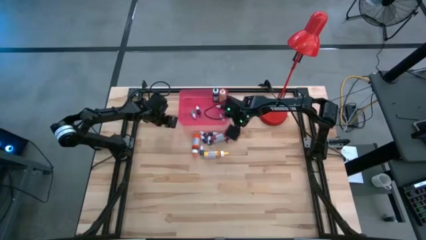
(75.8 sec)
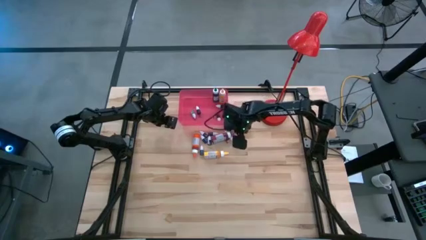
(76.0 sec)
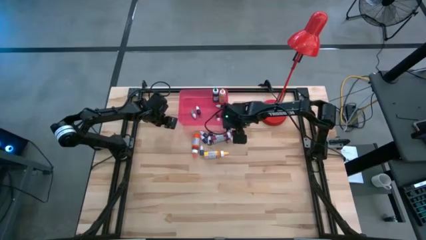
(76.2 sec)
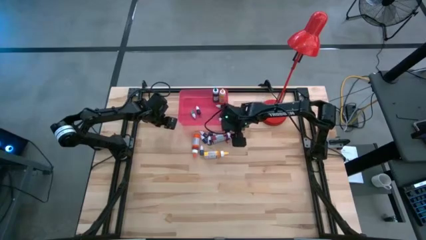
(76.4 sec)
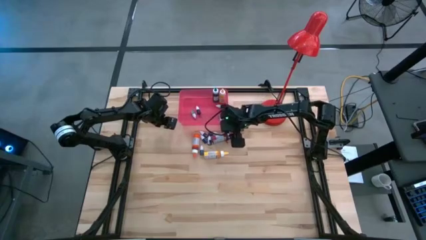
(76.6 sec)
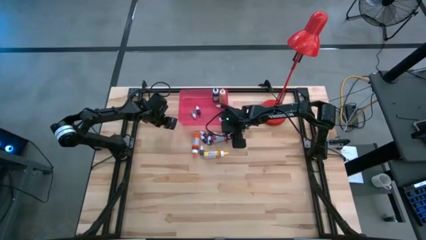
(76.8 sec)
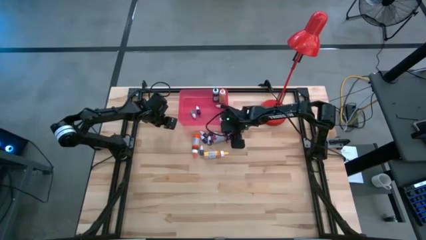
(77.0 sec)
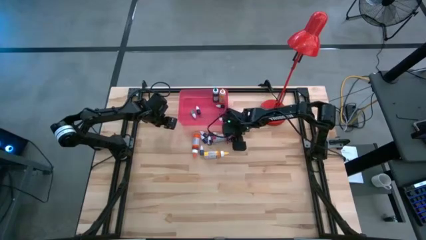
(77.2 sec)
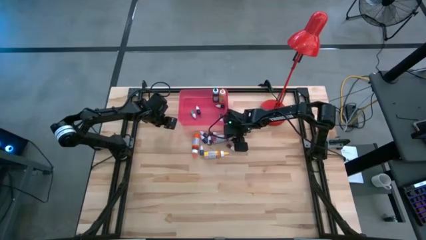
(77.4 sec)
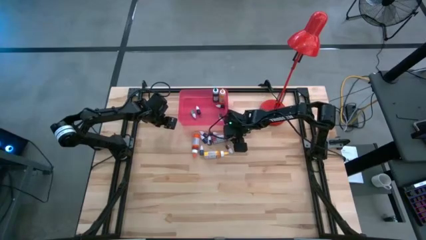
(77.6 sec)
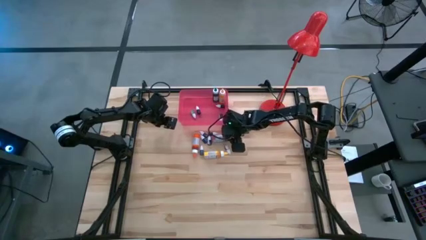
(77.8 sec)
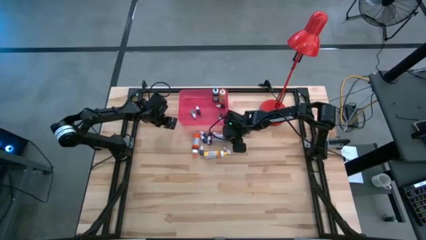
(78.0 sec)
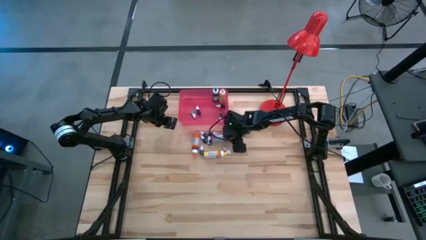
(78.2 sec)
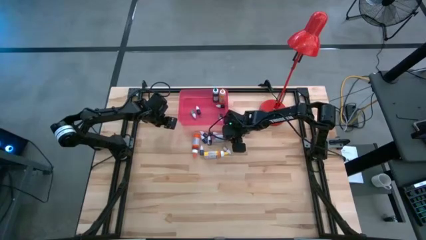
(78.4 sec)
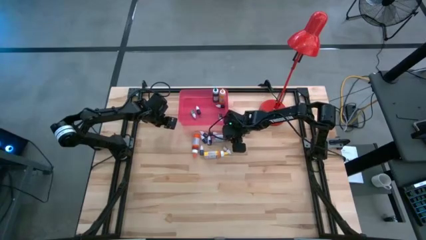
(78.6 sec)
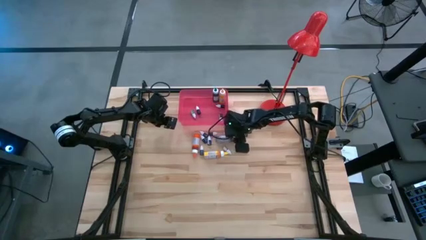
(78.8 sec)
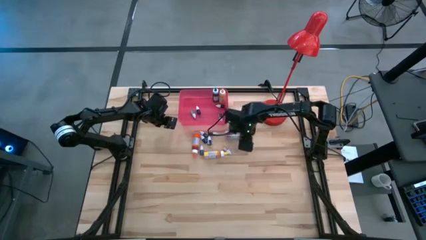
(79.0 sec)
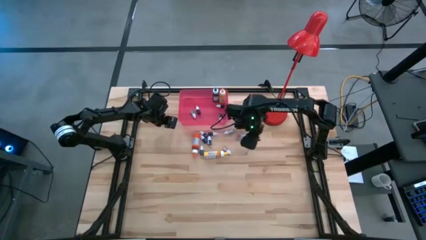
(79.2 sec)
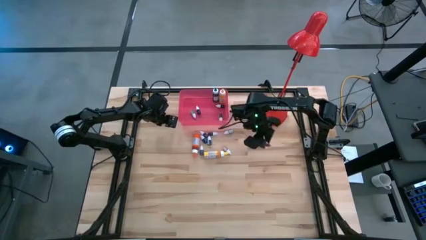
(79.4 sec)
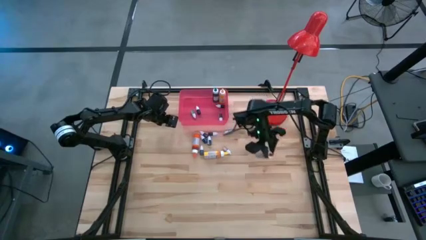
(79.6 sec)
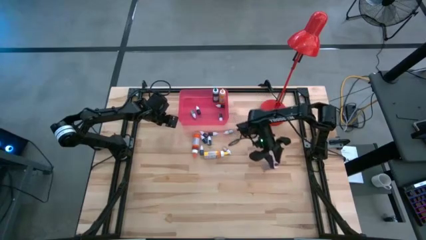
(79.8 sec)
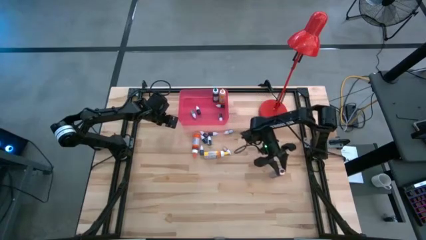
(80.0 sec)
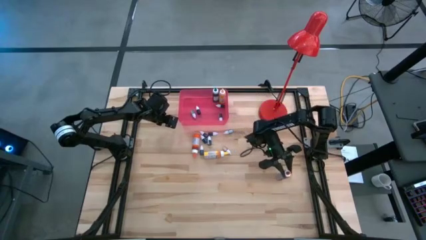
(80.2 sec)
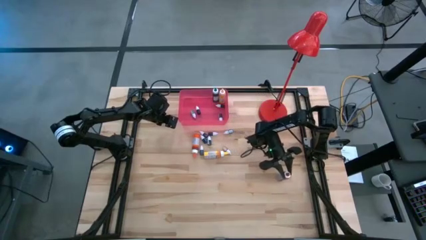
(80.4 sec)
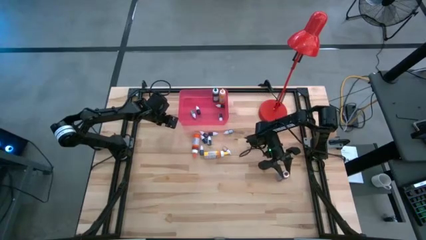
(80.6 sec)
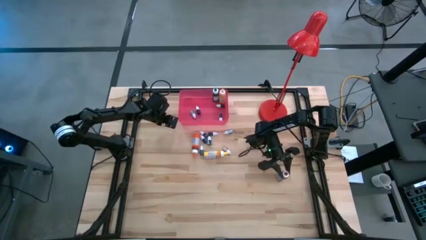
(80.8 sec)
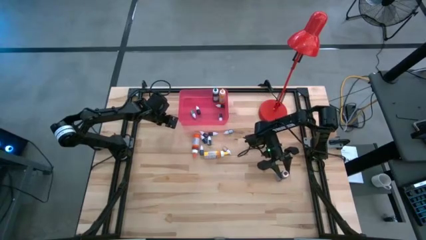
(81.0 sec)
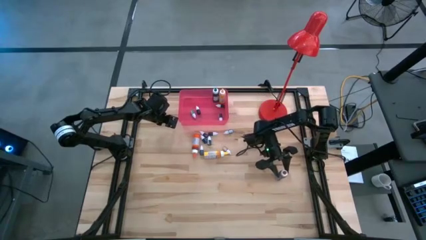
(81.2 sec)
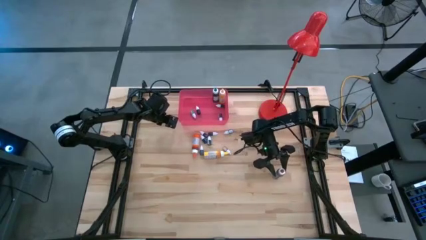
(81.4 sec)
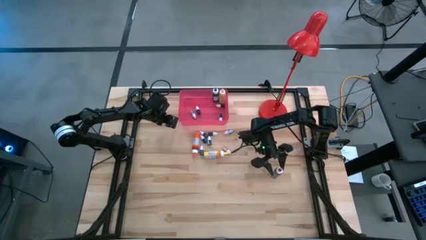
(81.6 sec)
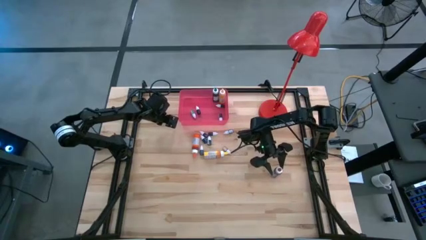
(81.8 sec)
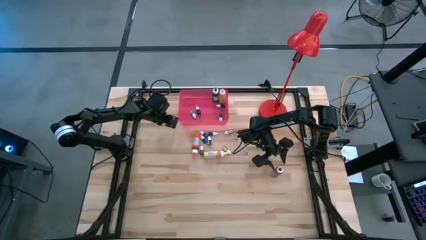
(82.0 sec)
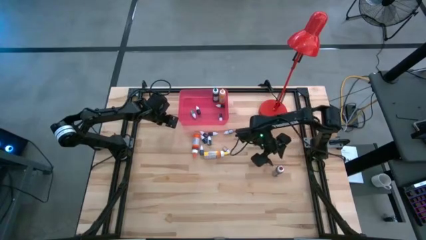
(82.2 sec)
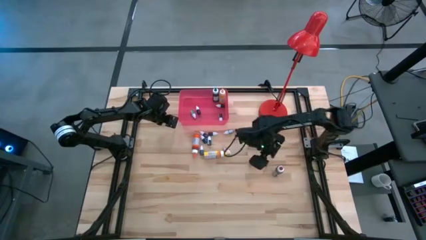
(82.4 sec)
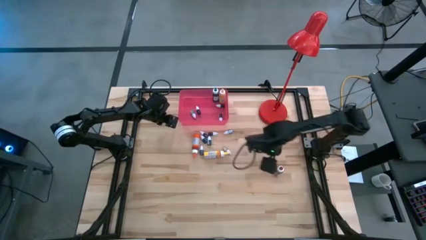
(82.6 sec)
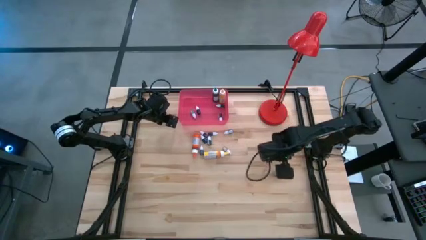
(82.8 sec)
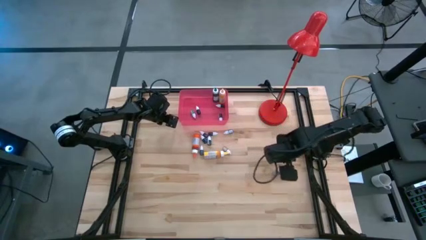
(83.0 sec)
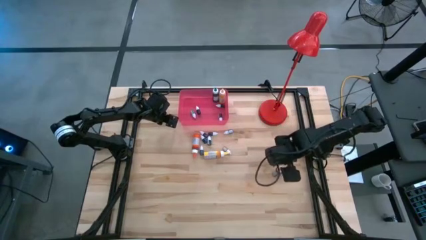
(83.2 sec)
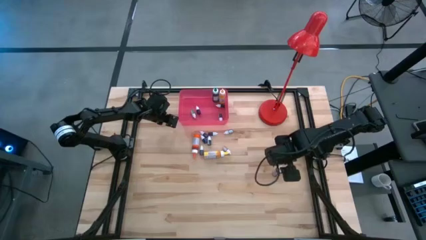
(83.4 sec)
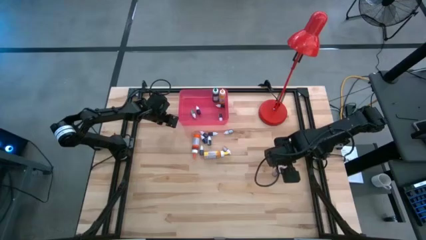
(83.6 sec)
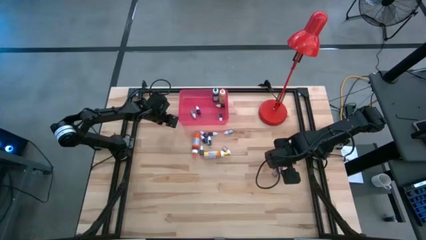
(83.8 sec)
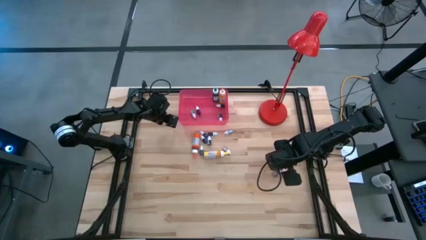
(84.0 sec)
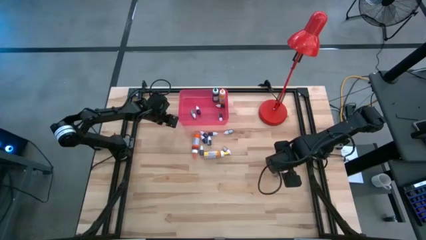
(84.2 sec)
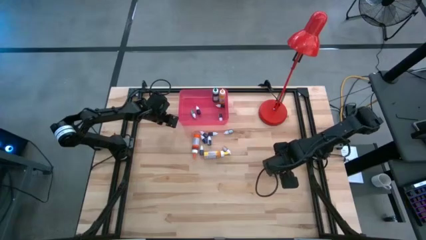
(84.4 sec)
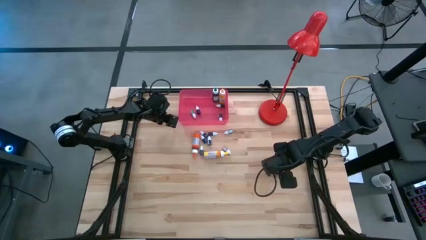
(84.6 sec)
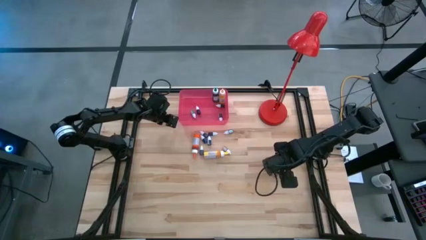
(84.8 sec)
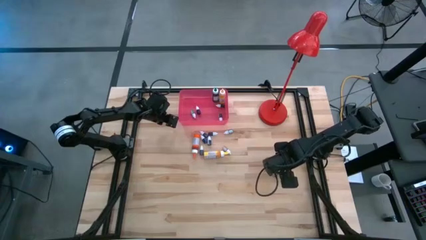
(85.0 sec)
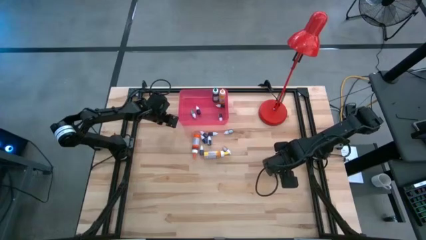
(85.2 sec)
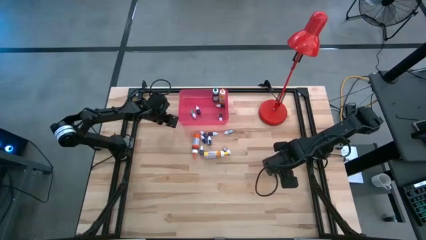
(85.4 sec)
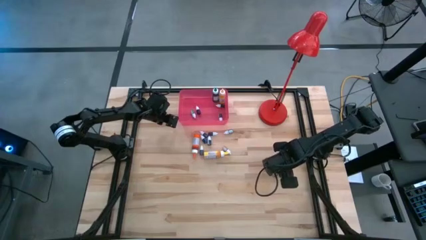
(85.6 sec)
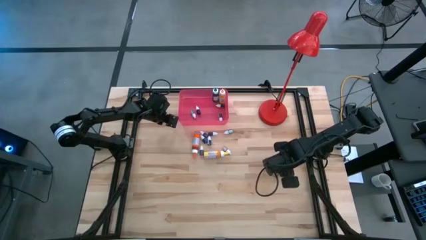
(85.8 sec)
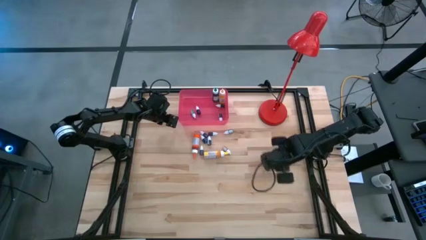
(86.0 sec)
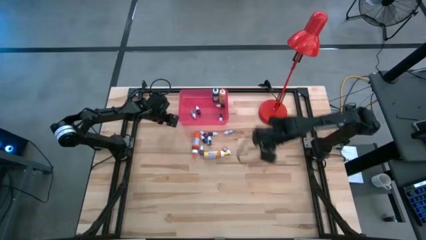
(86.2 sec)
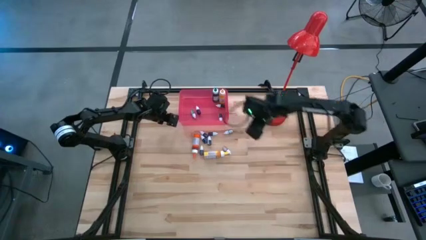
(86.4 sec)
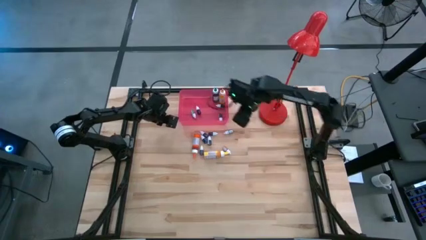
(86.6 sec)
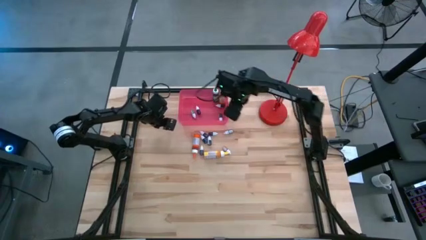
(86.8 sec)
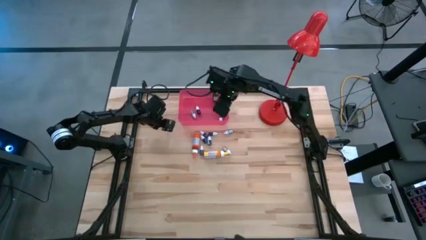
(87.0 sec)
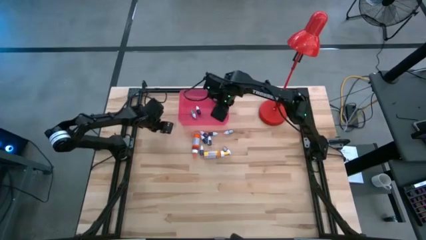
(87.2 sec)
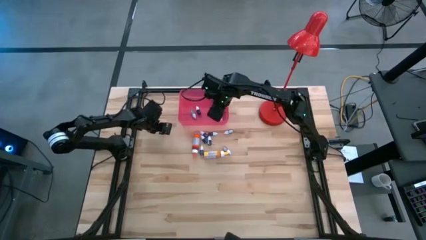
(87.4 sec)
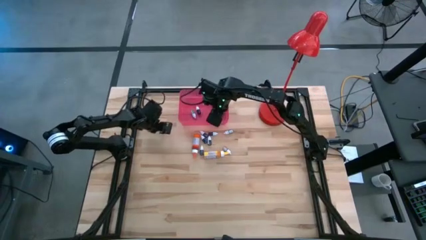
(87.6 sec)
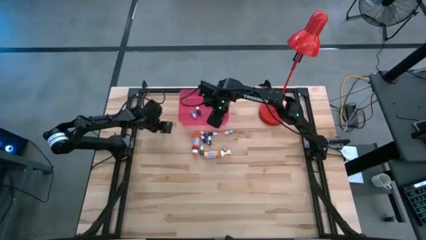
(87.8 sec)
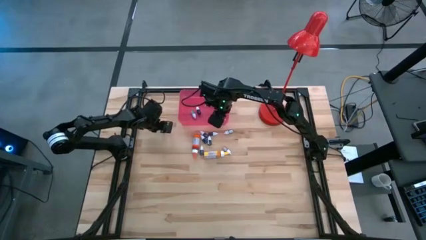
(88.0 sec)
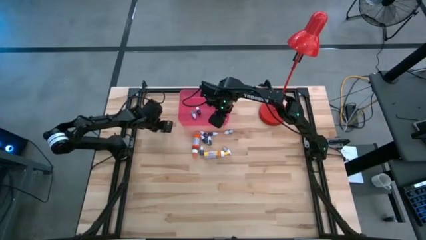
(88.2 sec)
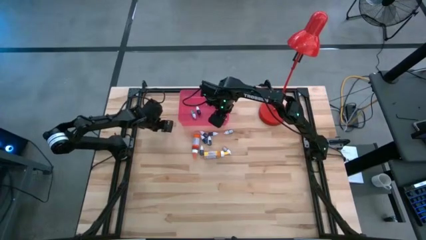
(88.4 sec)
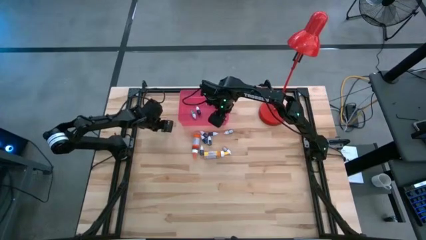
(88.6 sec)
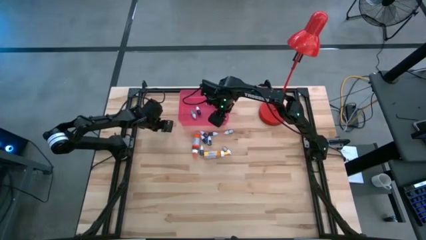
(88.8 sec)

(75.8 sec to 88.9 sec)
Task: Pick & Place food coloring
Put the big red food coloring bottle into the red bin
